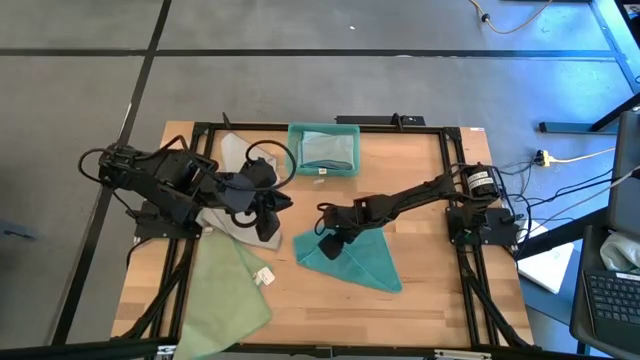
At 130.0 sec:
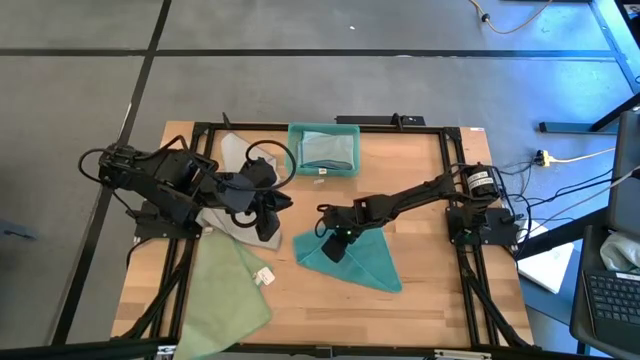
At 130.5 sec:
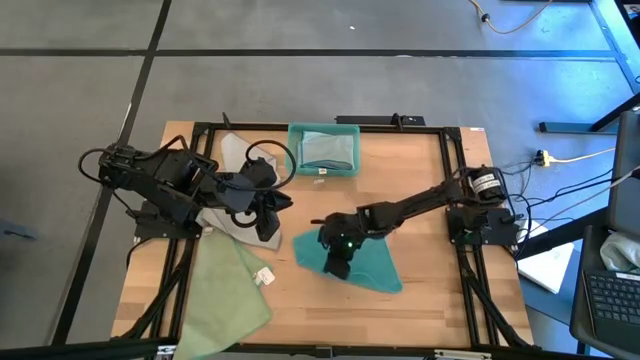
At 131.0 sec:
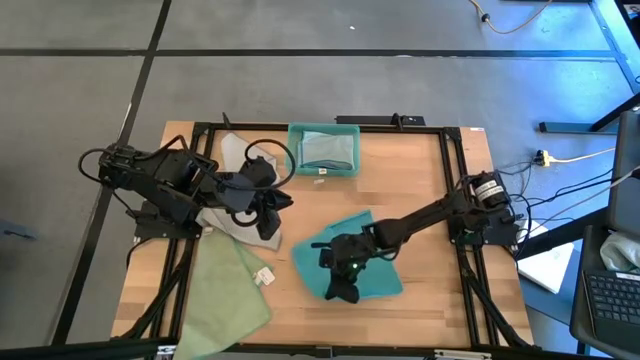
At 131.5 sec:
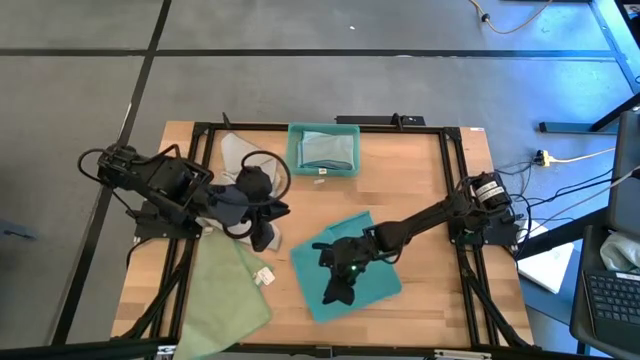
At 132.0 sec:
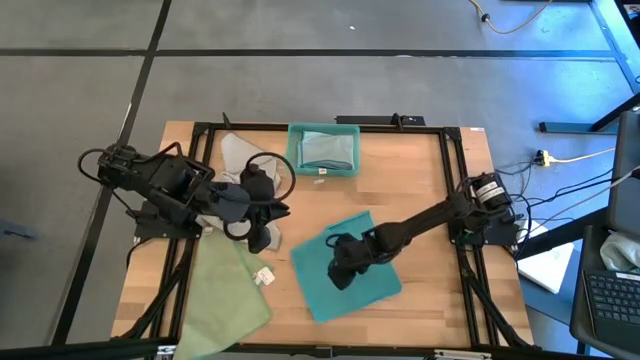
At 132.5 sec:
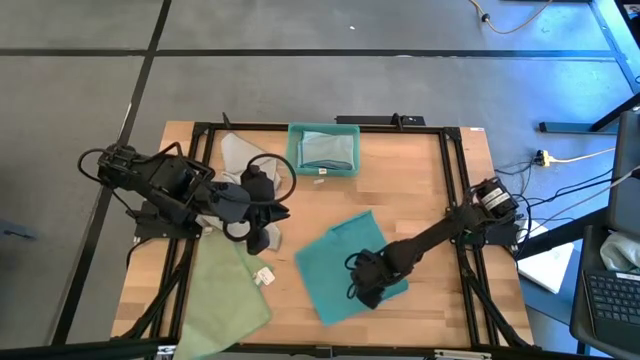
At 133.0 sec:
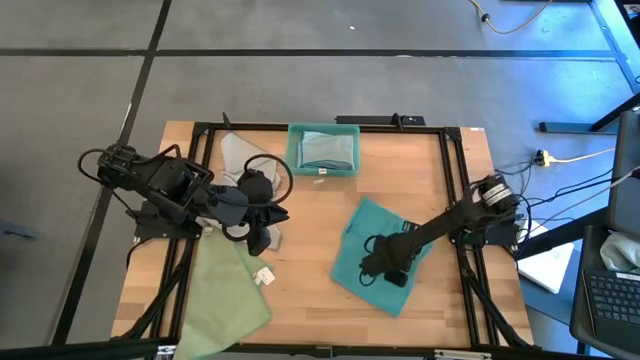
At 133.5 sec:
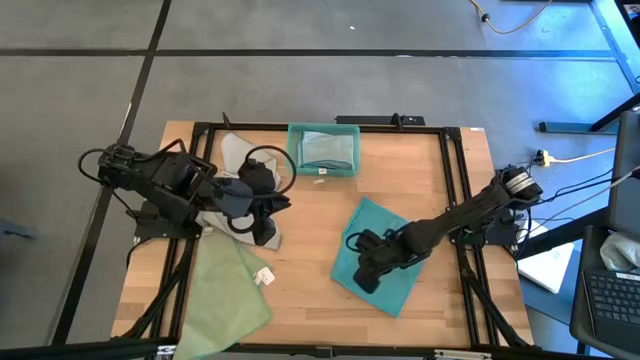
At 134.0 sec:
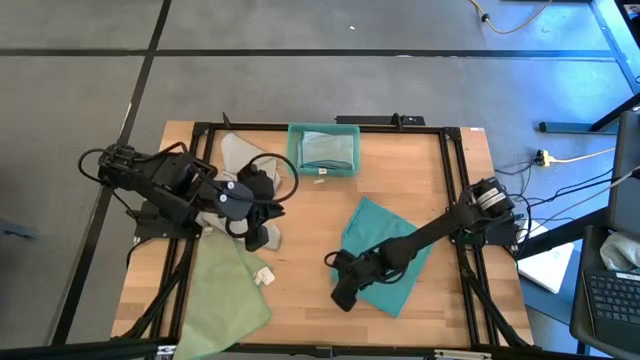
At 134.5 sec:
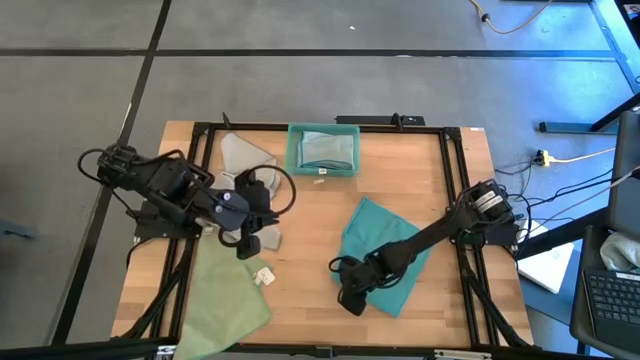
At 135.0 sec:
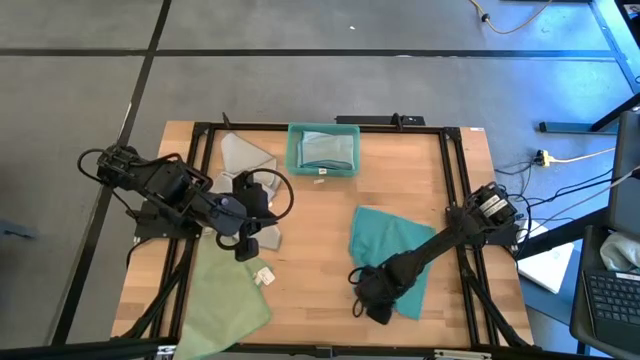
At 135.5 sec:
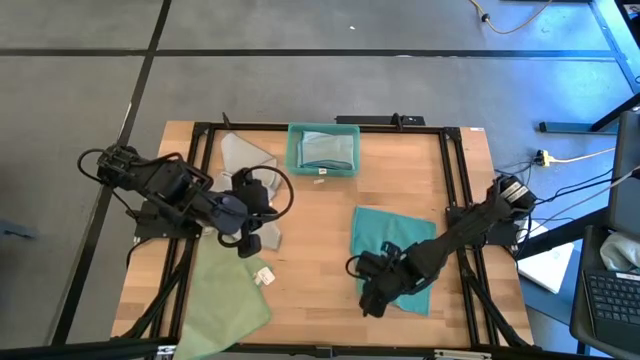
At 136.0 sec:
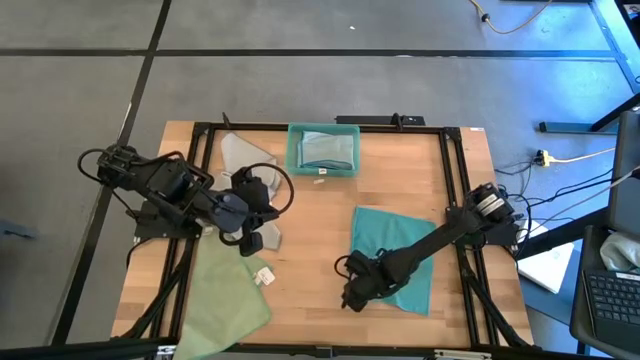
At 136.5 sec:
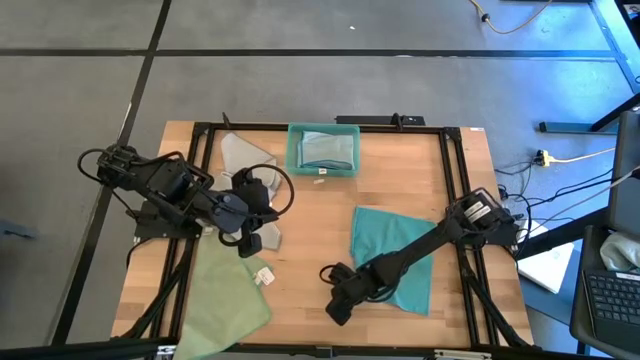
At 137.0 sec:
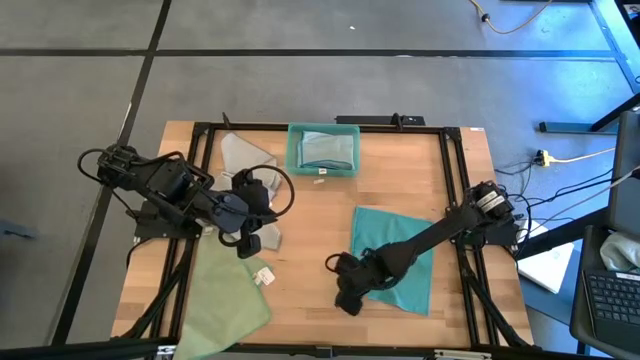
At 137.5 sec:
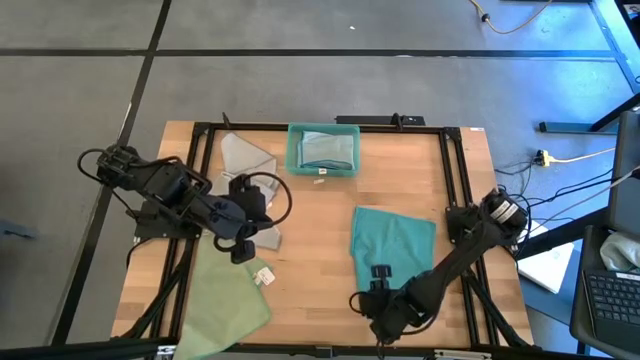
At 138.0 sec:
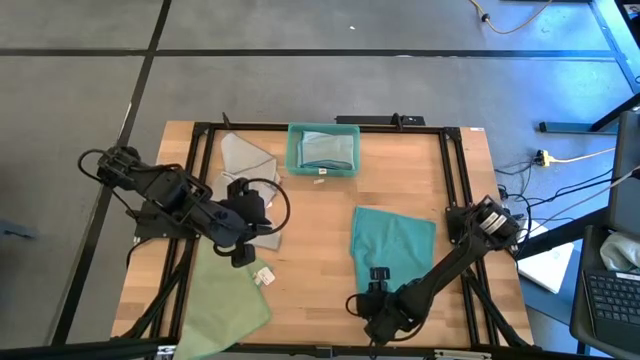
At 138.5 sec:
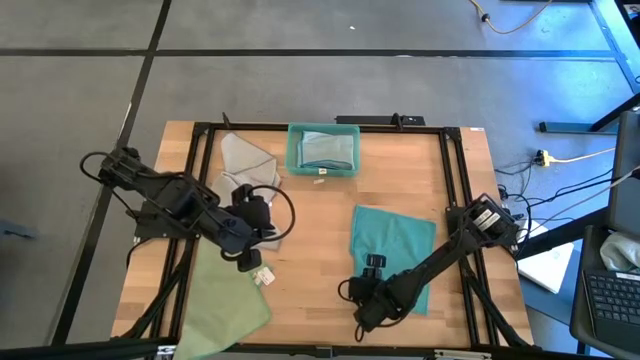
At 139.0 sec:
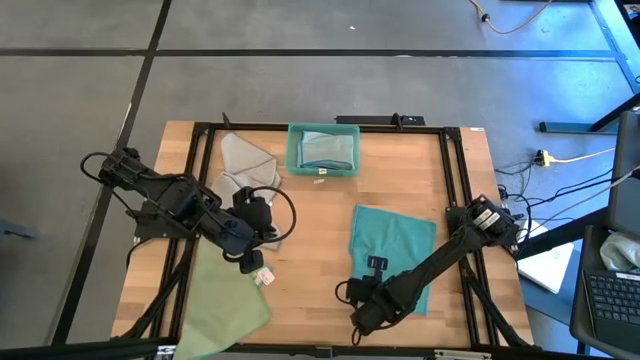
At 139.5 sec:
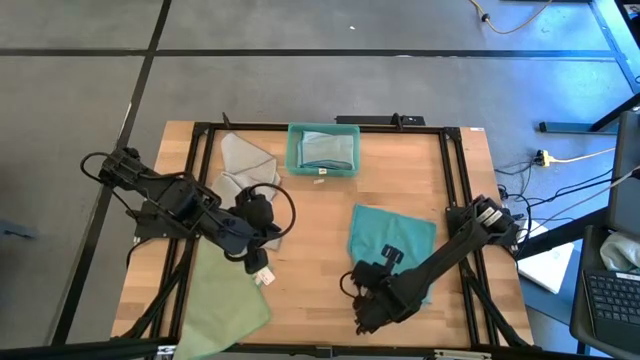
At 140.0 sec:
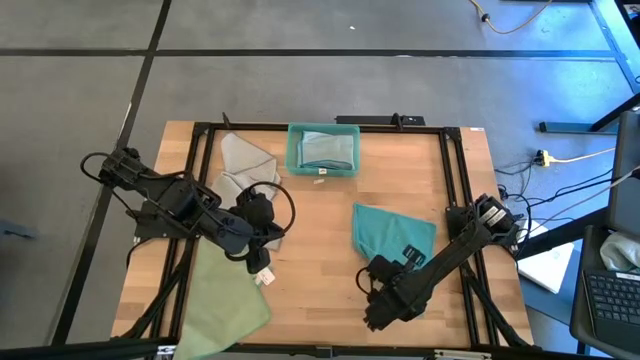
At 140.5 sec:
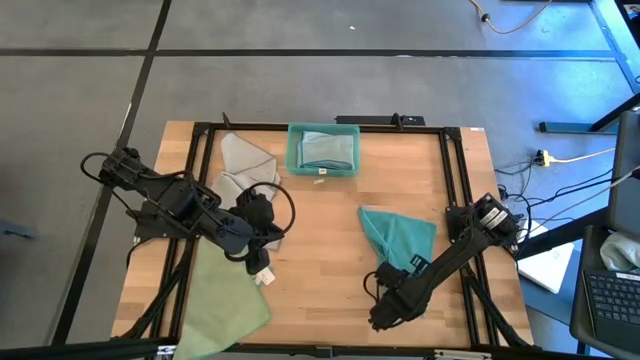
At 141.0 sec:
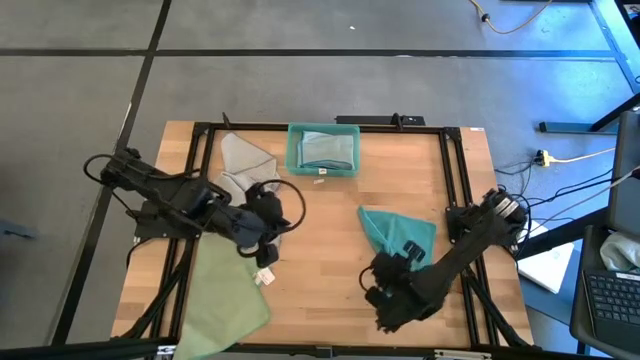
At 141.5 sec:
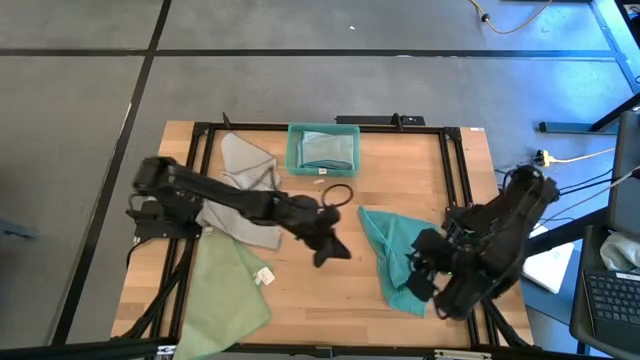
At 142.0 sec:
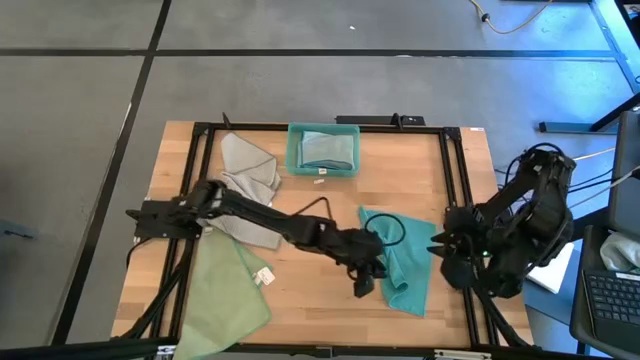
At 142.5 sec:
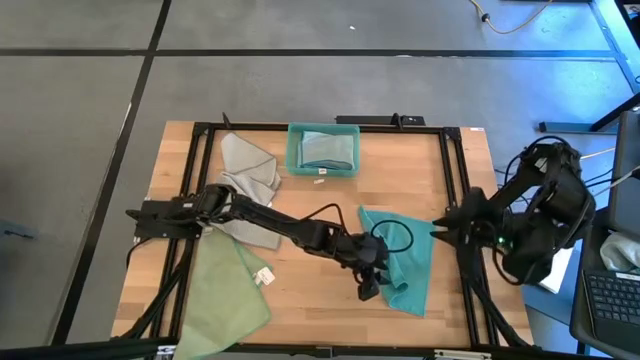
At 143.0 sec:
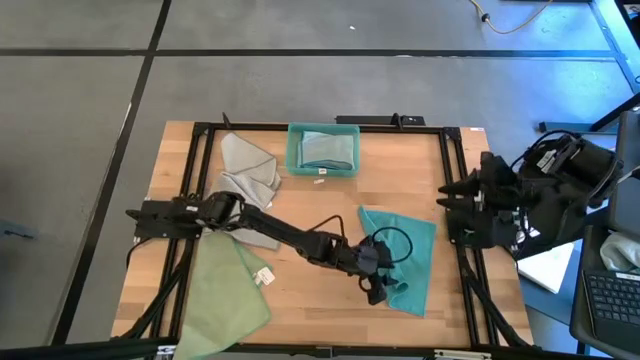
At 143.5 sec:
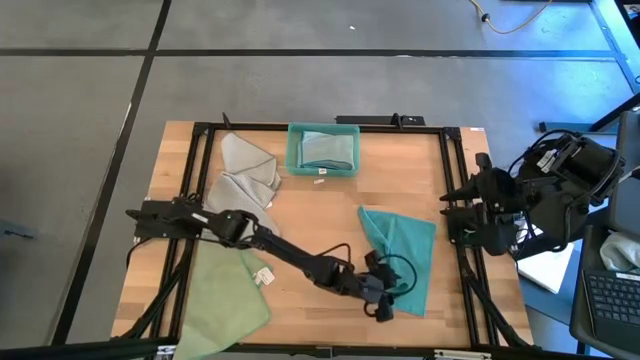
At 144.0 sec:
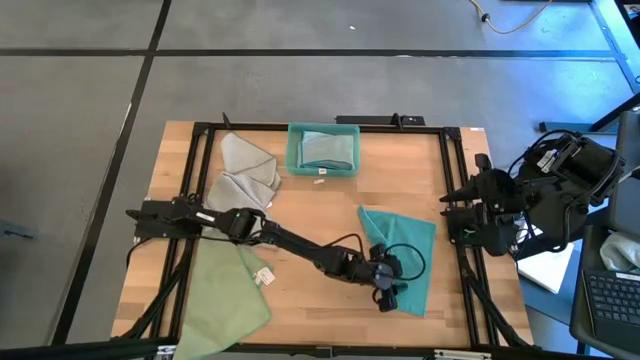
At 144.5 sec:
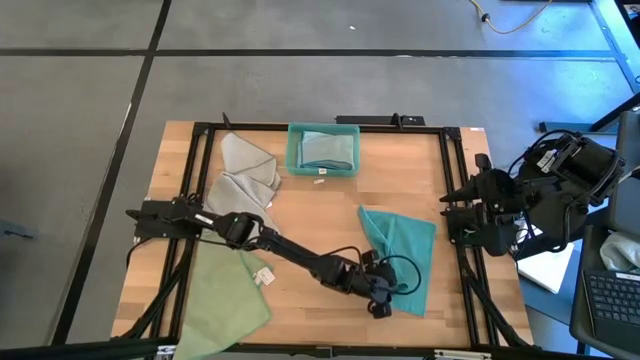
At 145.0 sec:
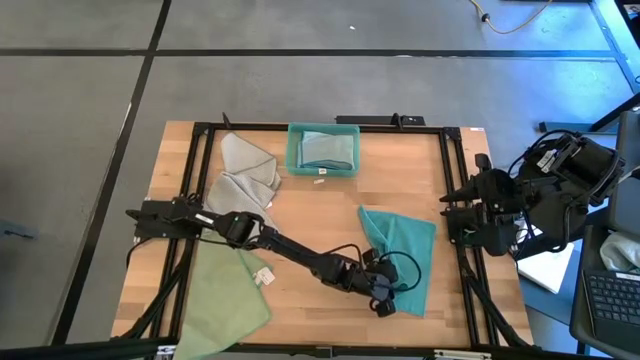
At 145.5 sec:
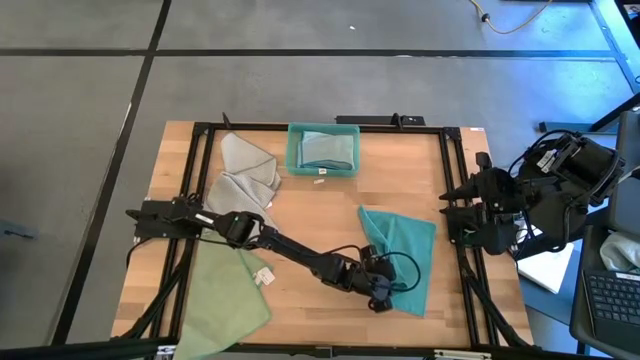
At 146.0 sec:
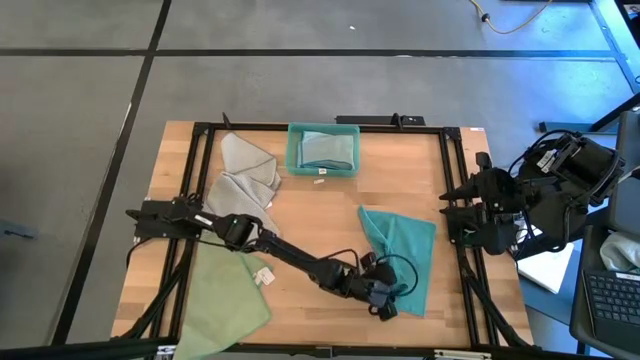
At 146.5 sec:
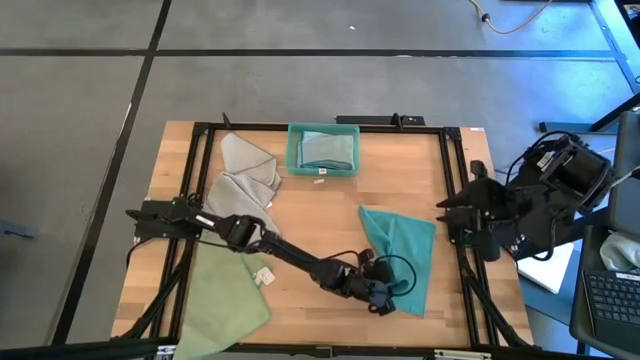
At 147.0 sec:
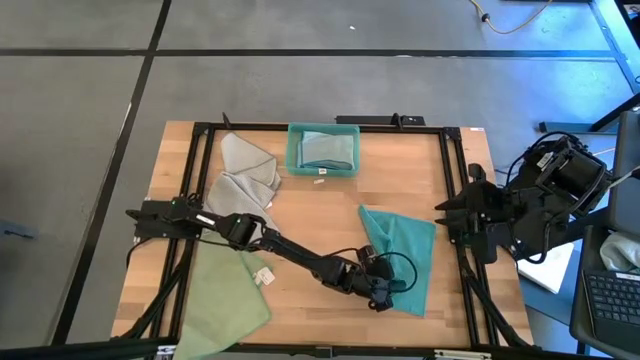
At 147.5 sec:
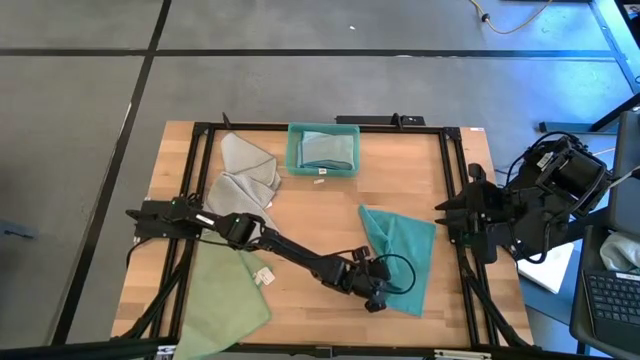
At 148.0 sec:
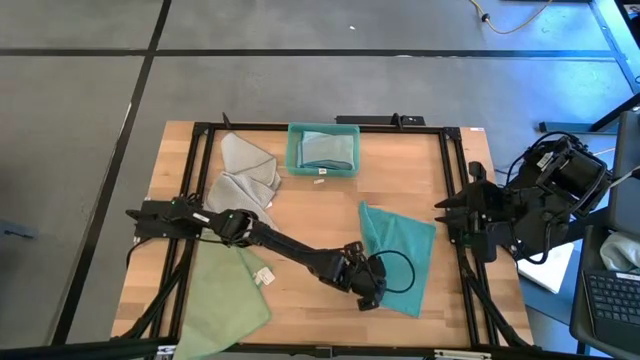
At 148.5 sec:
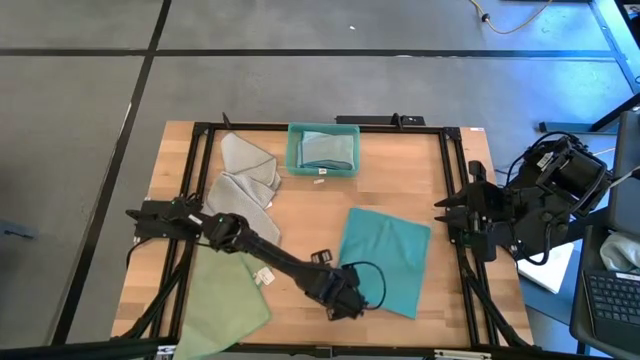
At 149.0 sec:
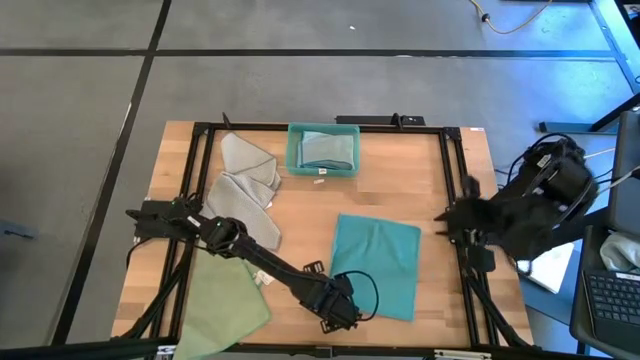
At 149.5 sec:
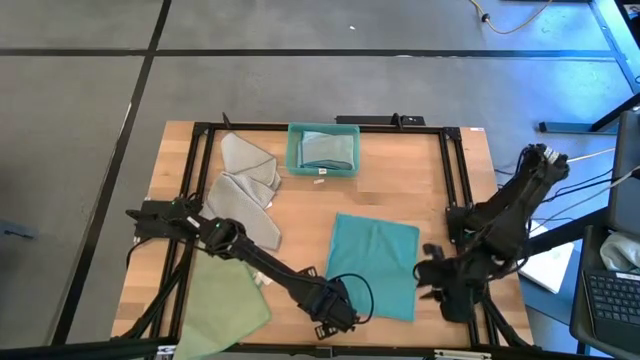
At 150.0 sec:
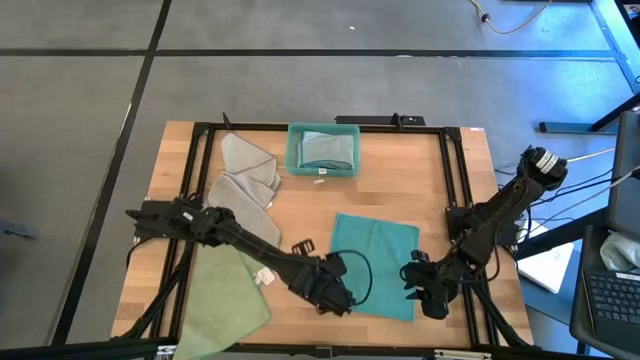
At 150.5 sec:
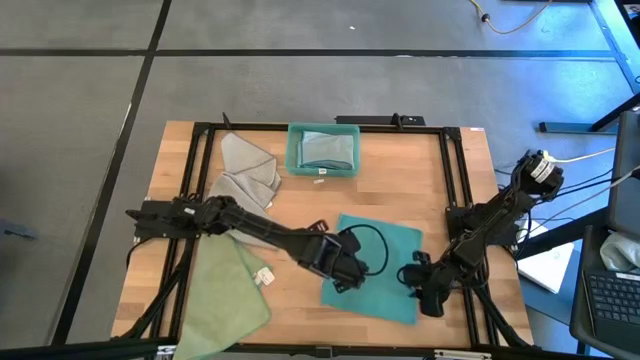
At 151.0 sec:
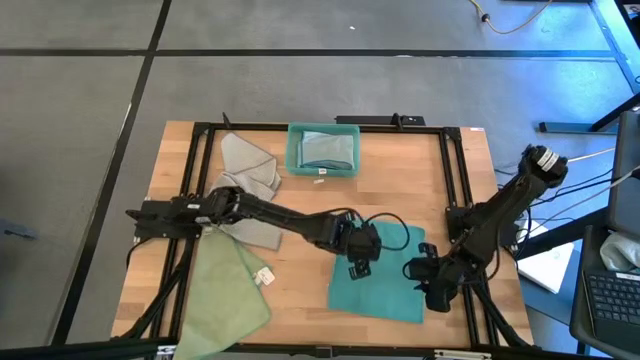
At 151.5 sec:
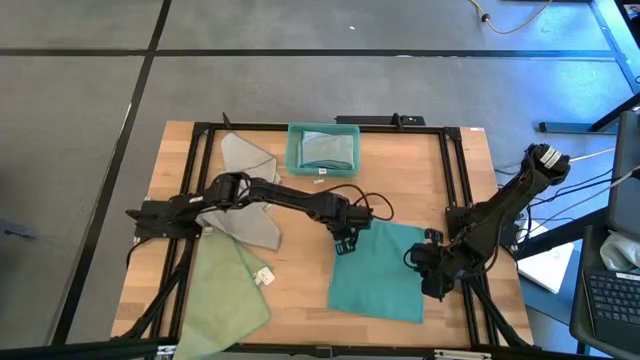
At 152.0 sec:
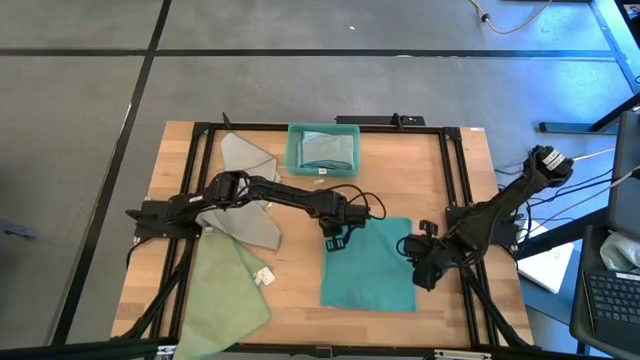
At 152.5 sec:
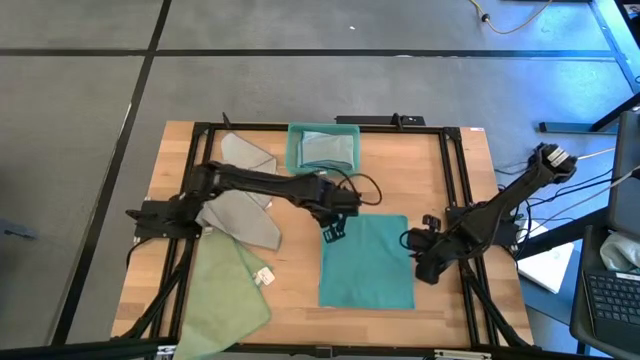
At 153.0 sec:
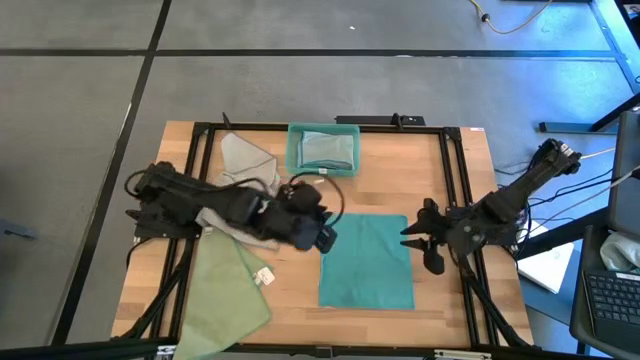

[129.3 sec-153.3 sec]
Task: Fold microfiber towels
Prepare the blue towel
